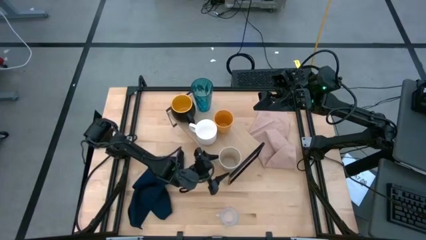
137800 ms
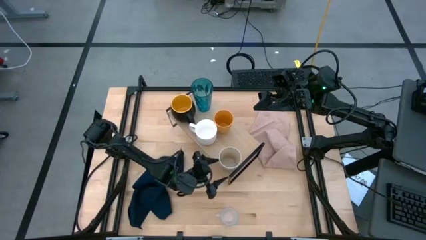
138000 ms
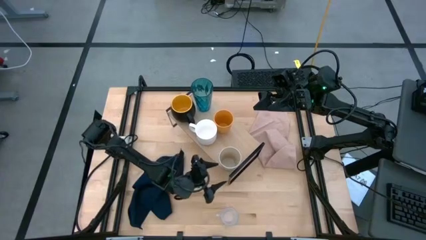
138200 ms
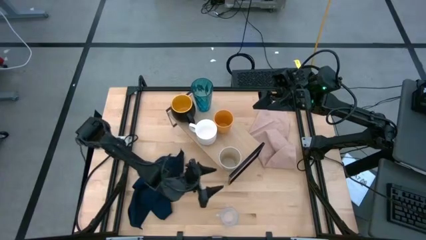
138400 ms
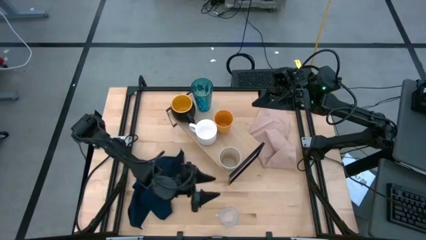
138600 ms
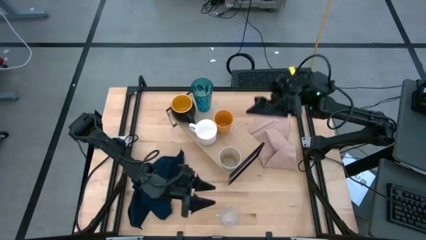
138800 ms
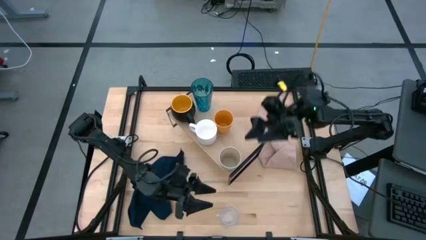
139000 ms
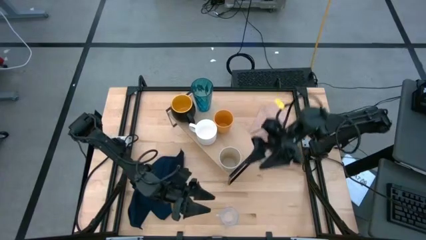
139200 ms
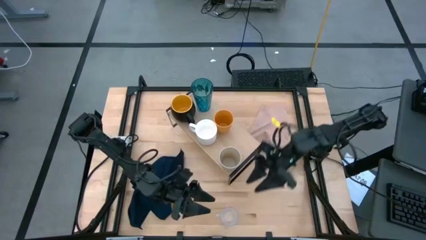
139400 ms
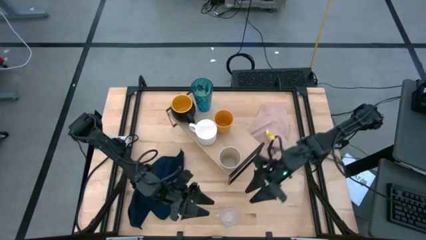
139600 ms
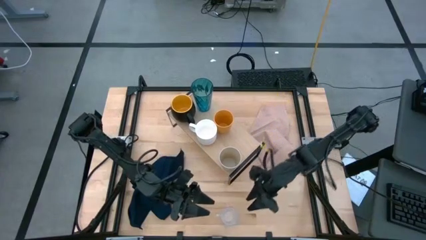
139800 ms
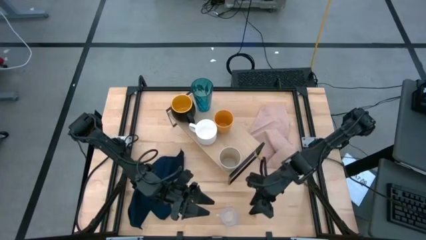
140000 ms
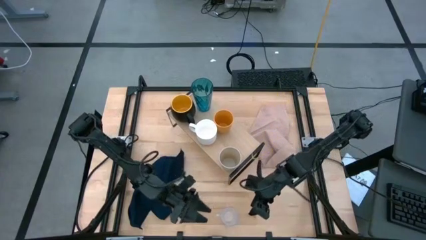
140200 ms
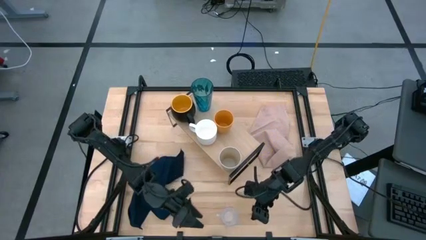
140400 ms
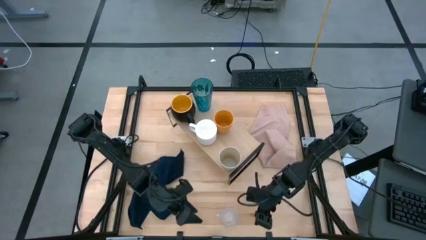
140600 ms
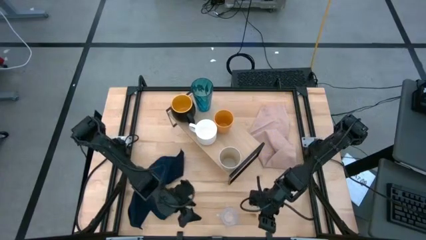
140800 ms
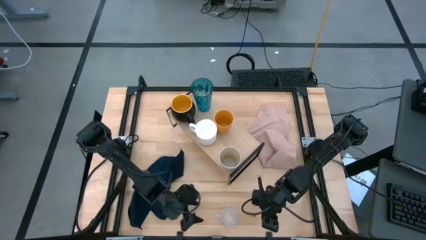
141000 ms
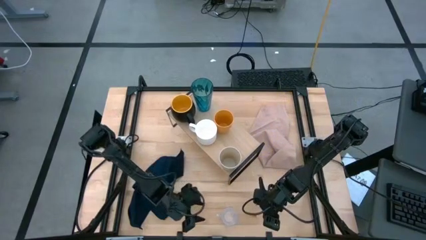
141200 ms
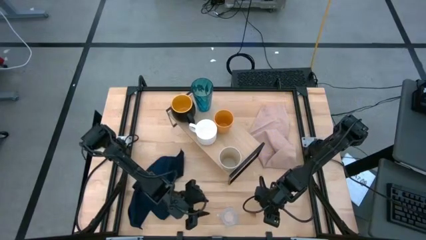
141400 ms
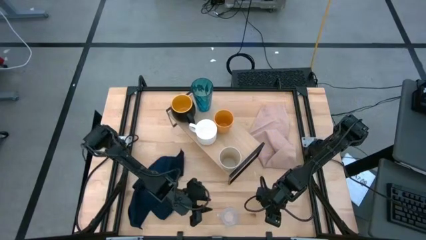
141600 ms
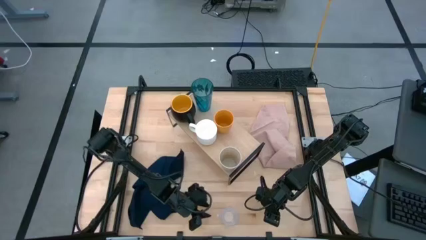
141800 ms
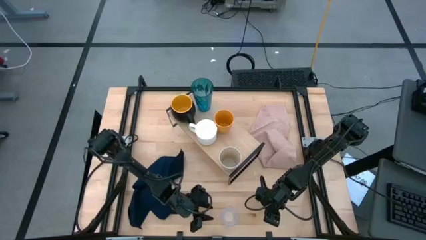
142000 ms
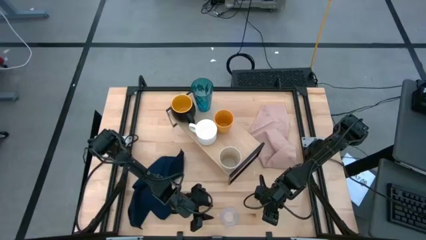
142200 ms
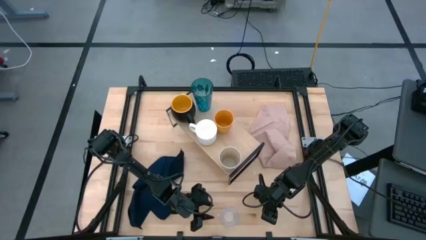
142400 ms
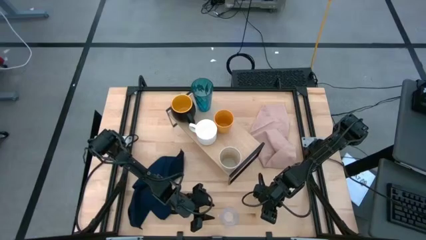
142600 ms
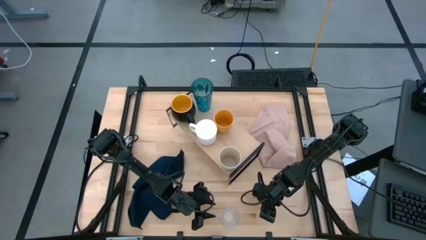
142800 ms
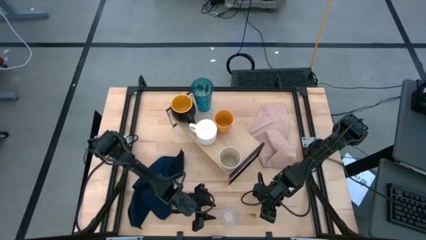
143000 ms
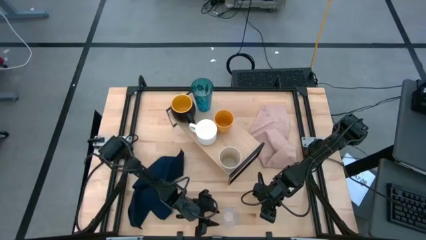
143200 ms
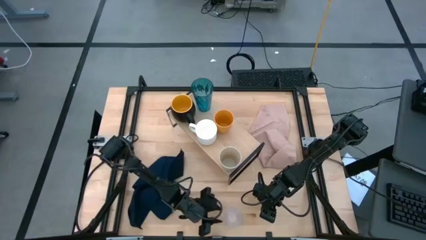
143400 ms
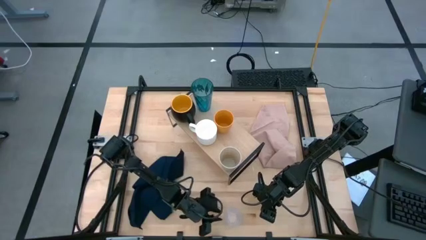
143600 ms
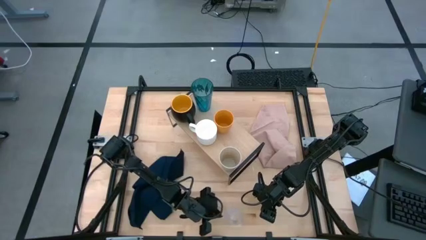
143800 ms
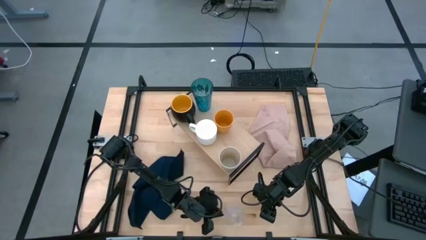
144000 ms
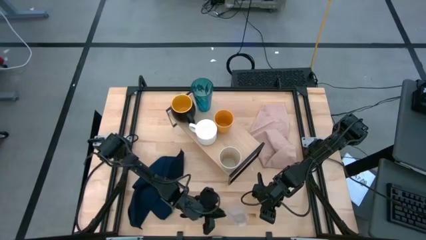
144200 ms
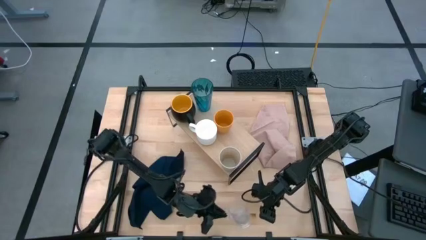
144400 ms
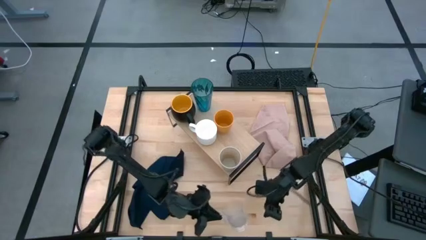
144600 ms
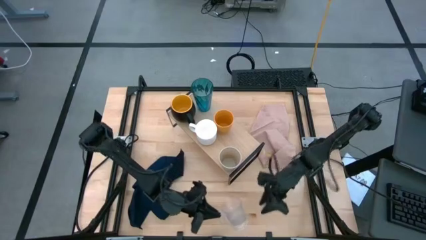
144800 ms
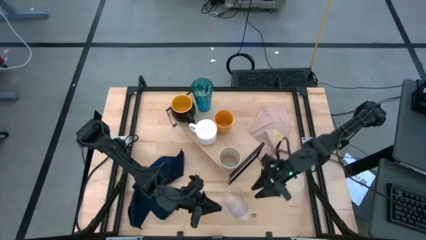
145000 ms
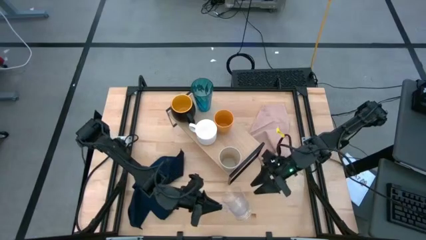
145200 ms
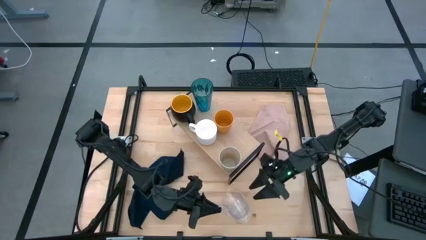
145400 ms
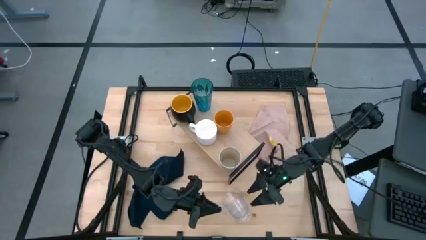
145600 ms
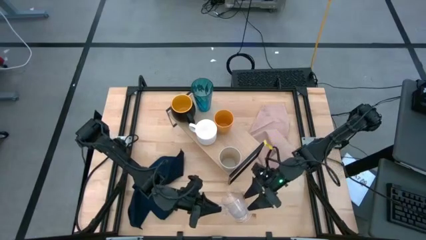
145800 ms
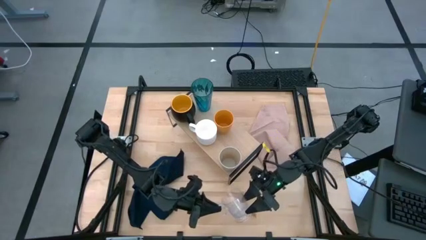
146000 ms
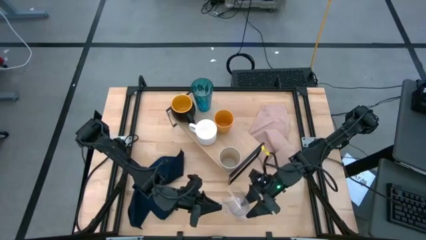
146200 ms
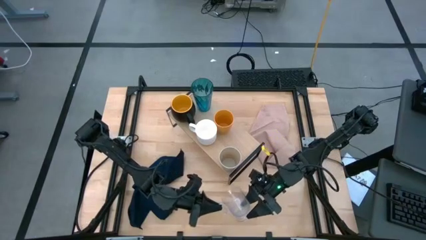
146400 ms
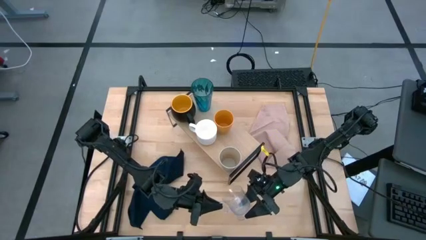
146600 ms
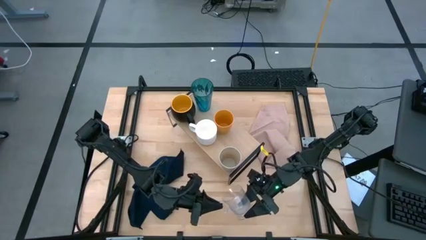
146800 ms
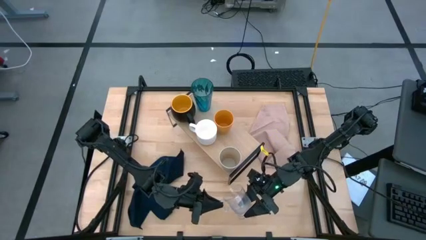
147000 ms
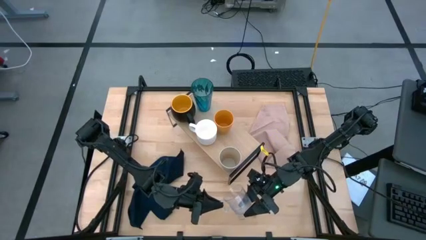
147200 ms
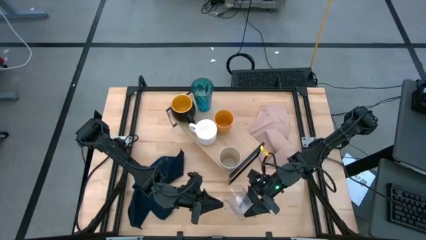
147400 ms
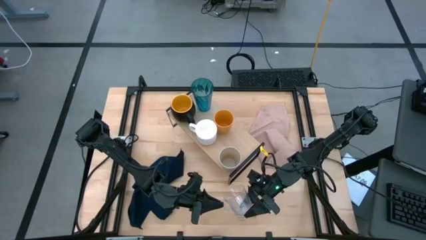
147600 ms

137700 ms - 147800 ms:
Task: Stack small to large cups/mugs on shelf
Put the transparent mug on the shelf
